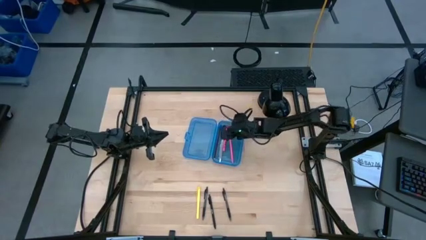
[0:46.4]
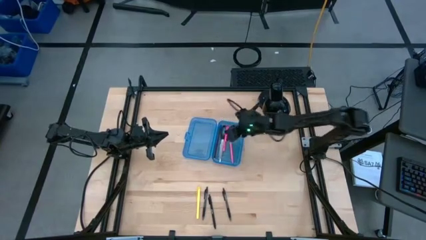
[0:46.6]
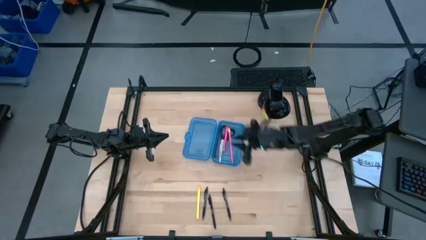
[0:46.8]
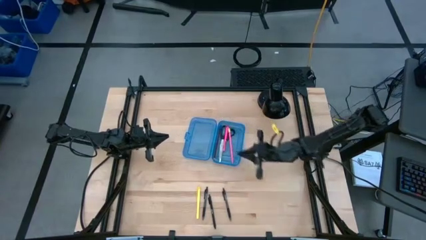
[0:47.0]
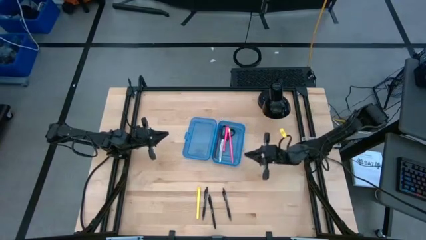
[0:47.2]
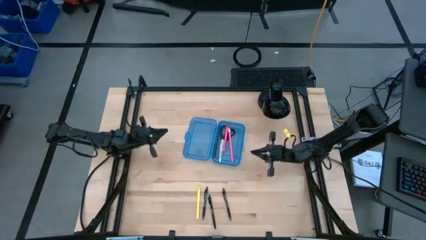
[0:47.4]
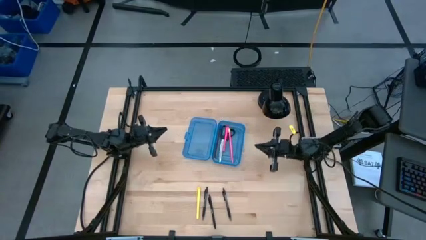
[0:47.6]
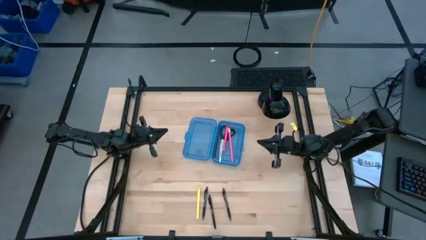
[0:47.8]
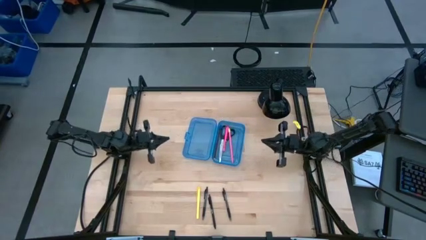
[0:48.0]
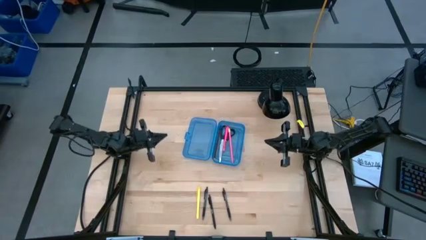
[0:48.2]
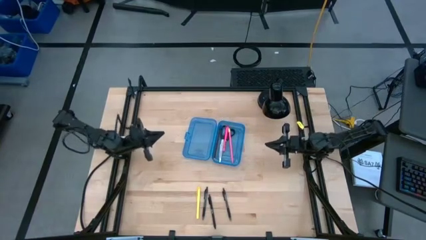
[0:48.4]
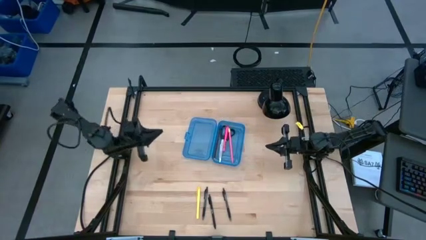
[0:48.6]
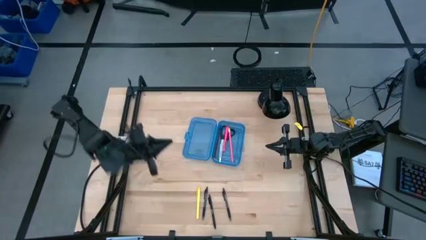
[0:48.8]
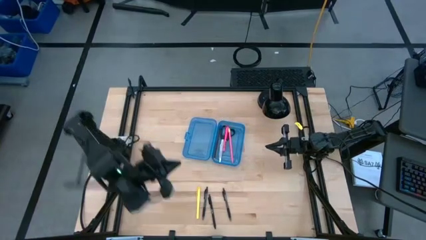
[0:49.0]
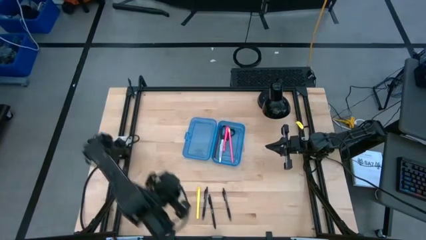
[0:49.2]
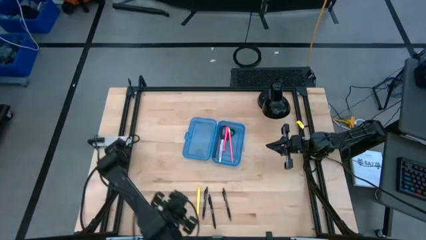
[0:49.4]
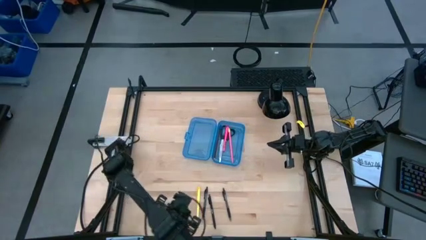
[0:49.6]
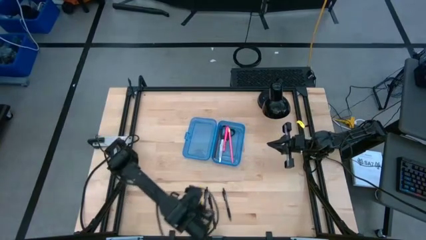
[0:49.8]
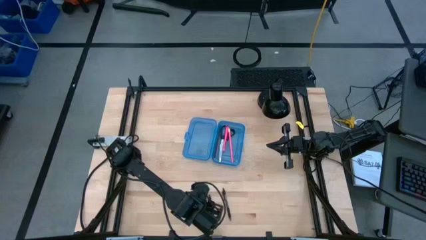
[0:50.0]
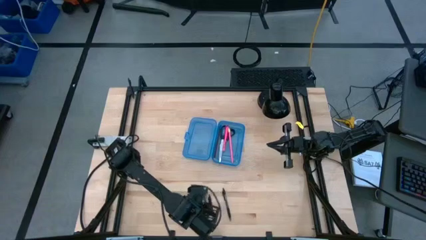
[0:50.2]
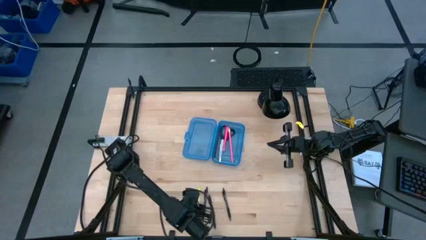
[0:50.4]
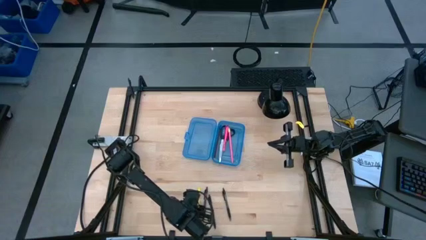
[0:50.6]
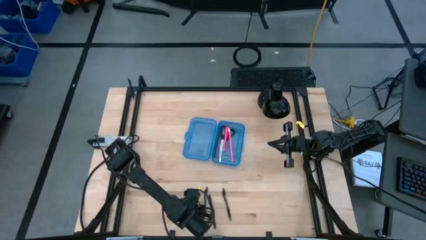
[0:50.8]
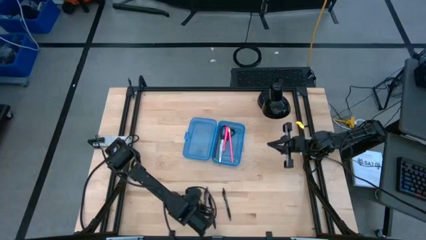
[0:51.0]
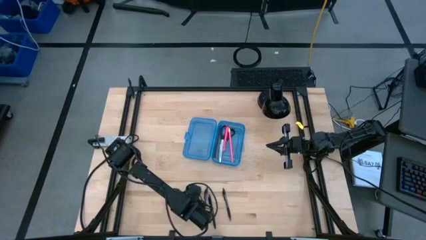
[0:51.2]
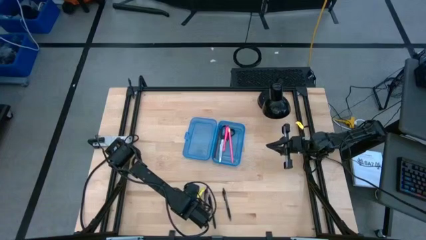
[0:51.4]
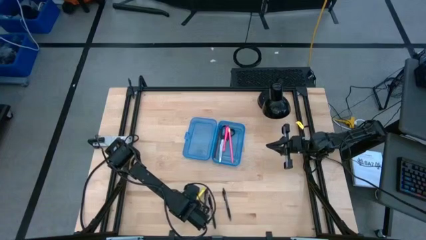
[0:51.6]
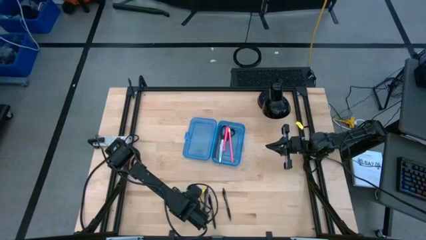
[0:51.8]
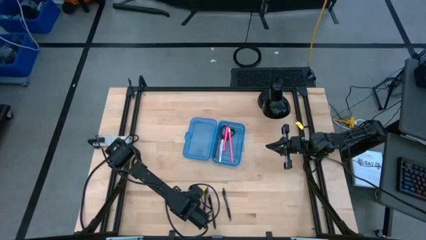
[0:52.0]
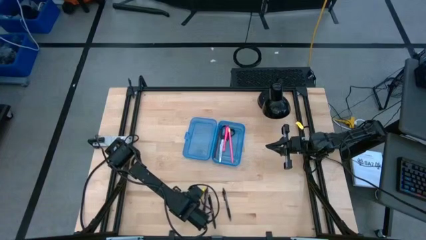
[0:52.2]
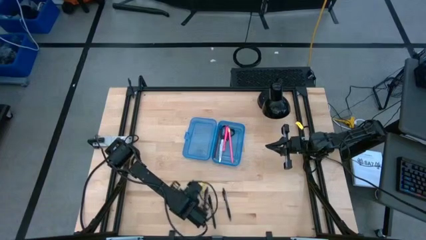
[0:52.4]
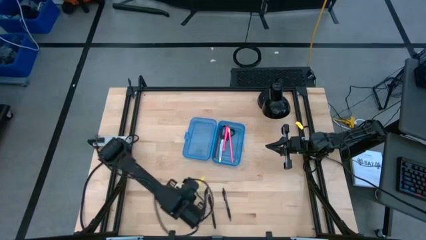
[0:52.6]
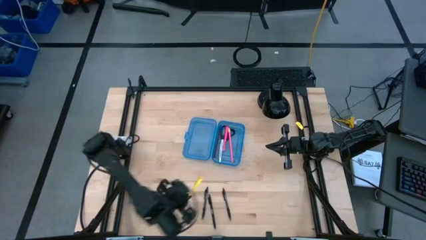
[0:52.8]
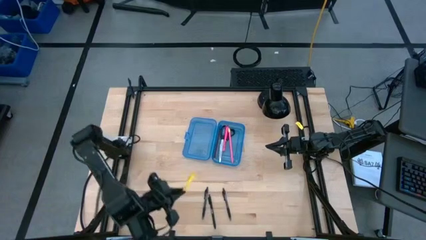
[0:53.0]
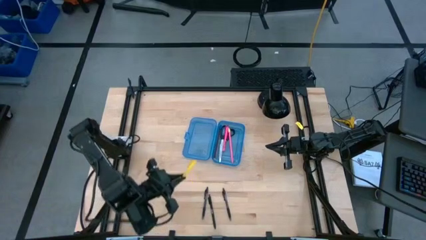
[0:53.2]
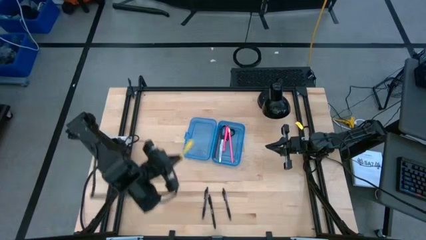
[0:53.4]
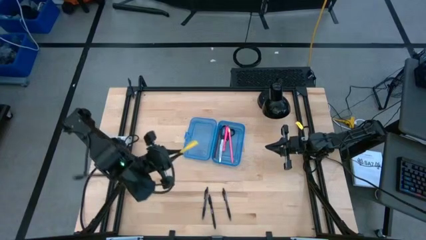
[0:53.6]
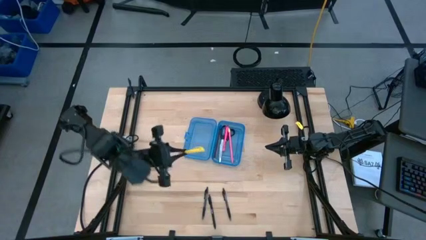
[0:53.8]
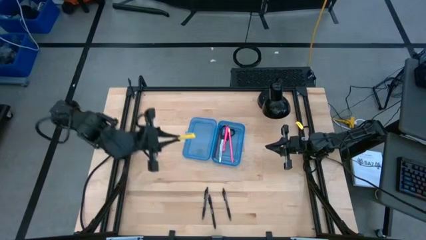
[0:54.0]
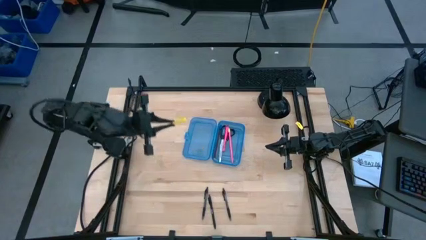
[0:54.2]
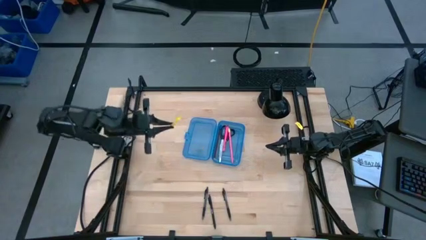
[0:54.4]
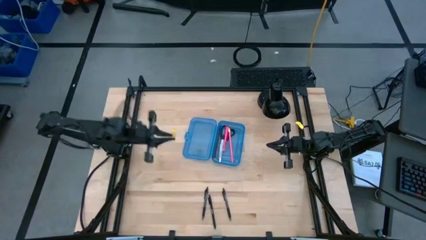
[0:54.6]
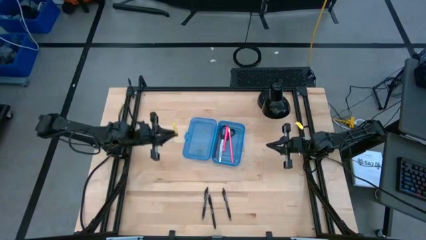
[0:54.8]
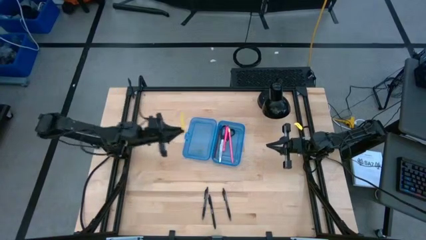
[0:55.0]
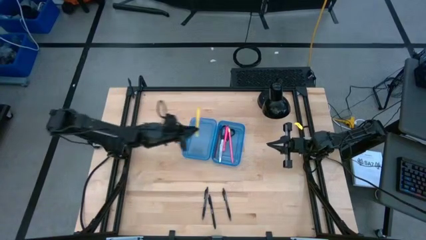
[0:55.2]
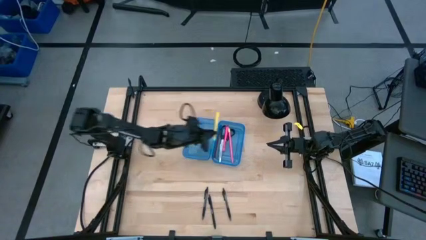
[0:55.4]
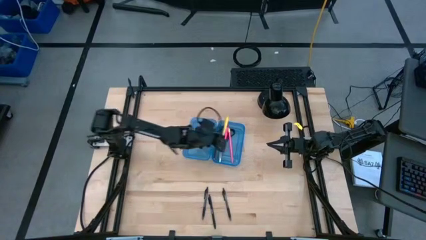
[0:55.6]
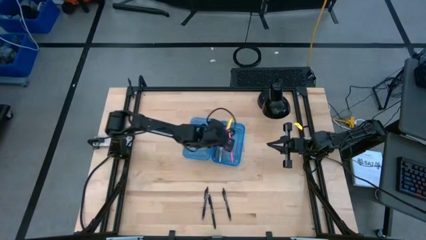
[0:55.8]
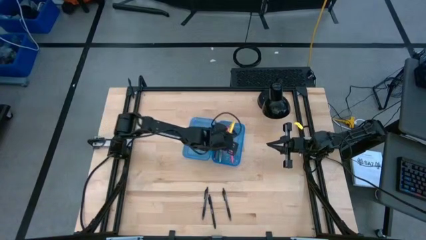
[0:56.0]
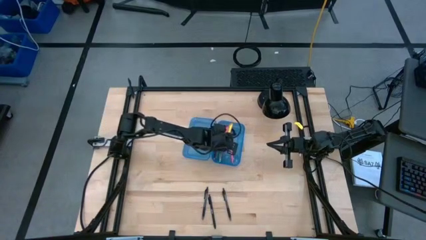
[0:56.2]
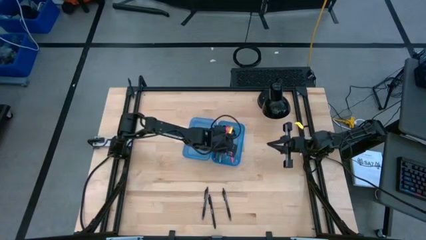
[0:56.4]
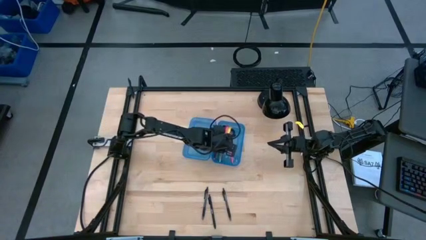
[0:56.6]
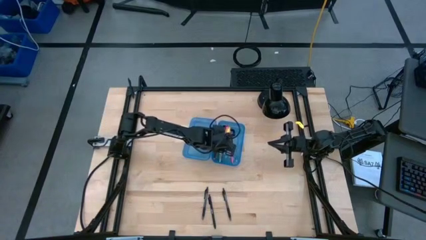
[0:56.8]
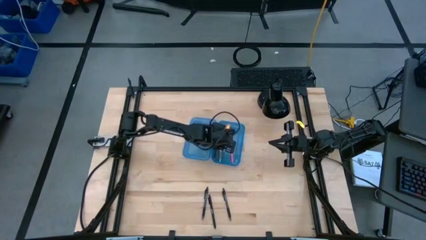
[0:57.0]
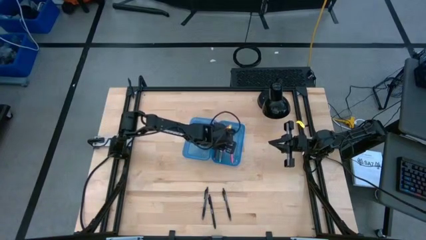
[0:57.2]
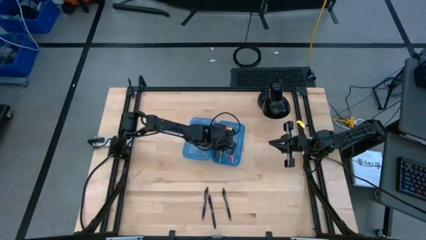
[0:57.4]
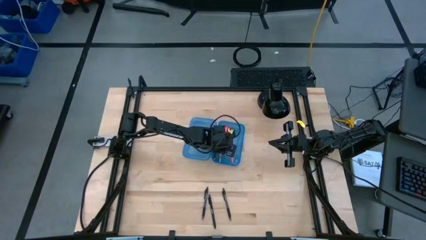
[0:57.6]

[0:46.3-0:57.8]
Task: Pick & place school supplies into a supply box
Put the yellow pen into the supply box

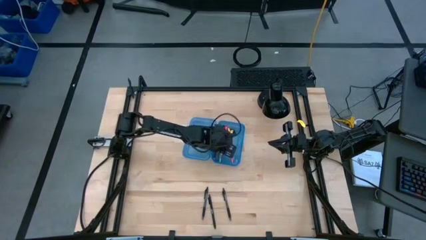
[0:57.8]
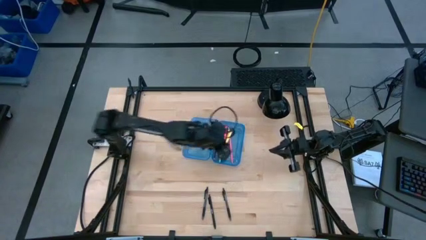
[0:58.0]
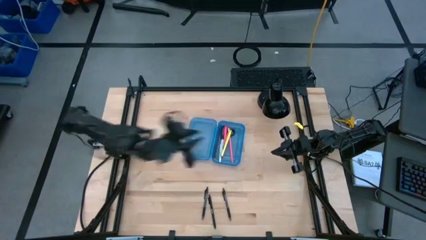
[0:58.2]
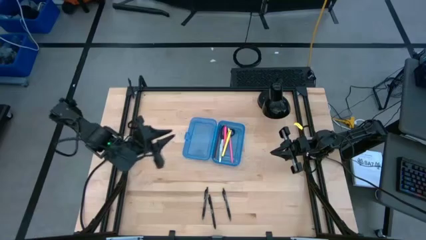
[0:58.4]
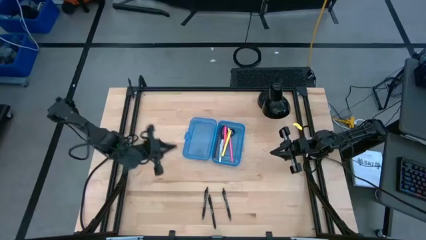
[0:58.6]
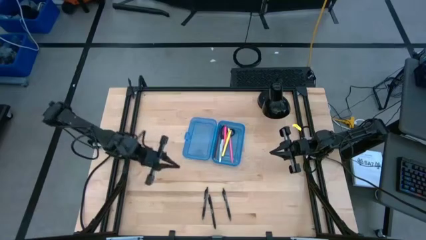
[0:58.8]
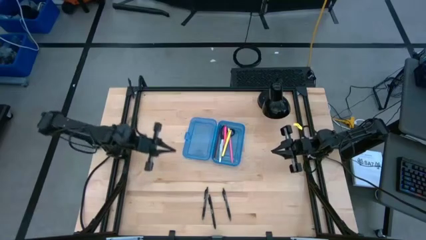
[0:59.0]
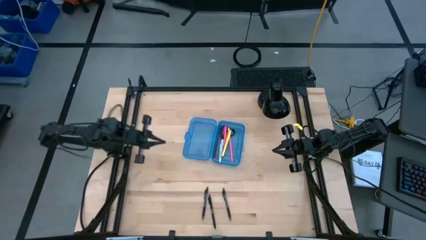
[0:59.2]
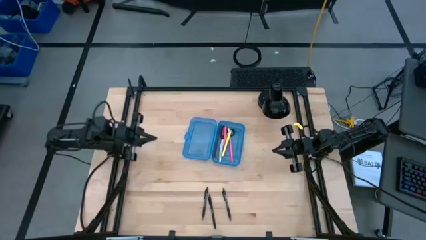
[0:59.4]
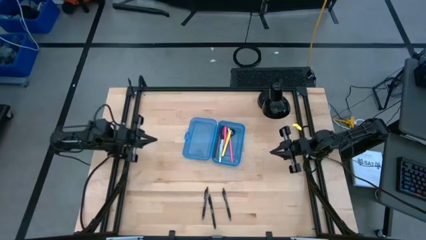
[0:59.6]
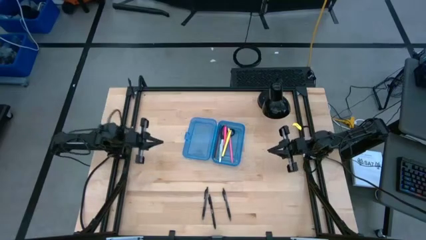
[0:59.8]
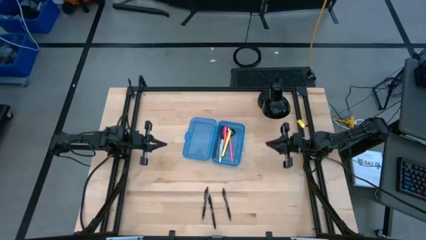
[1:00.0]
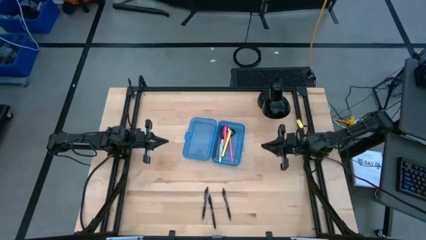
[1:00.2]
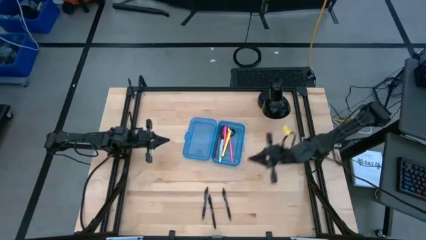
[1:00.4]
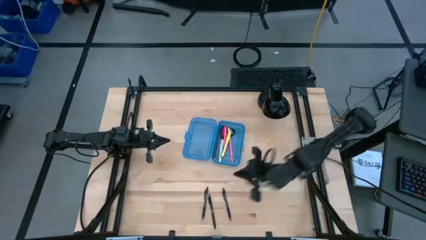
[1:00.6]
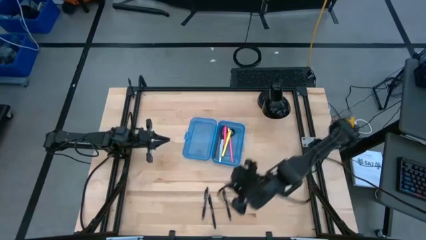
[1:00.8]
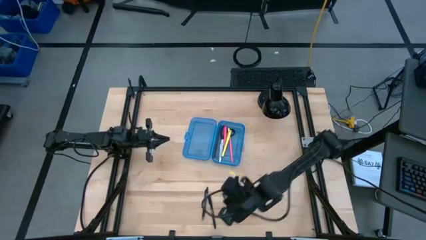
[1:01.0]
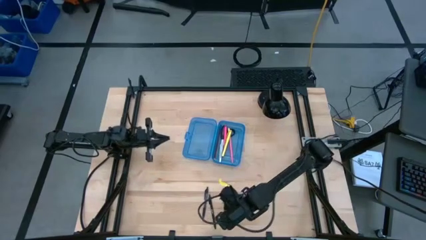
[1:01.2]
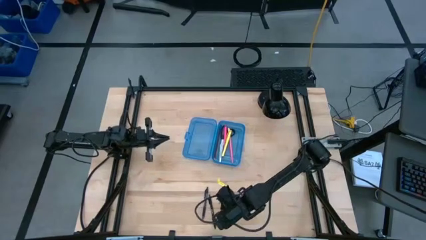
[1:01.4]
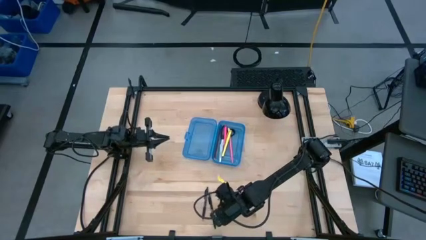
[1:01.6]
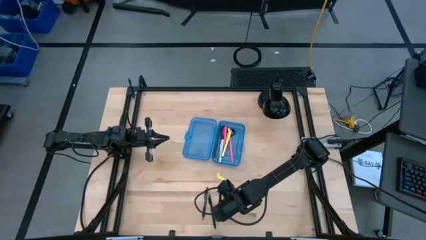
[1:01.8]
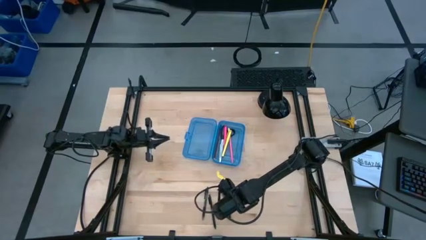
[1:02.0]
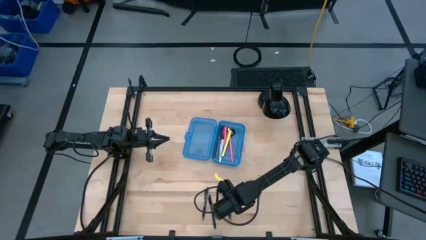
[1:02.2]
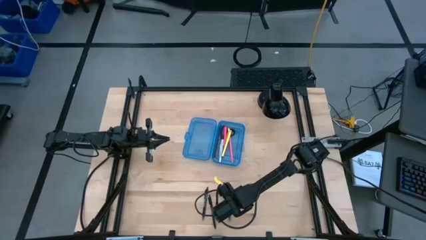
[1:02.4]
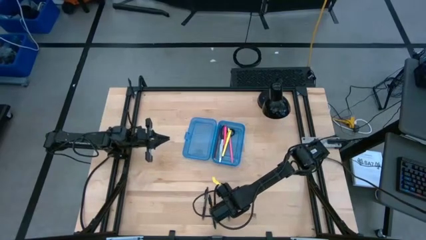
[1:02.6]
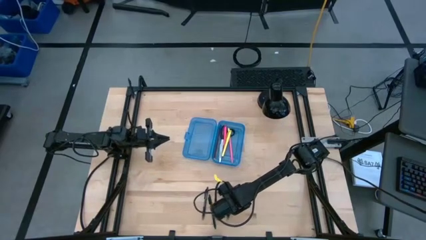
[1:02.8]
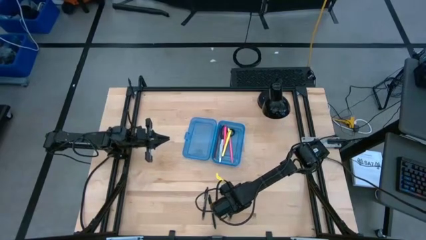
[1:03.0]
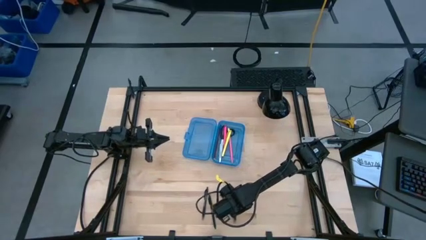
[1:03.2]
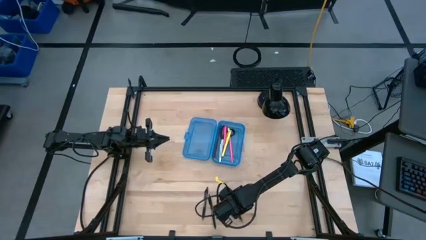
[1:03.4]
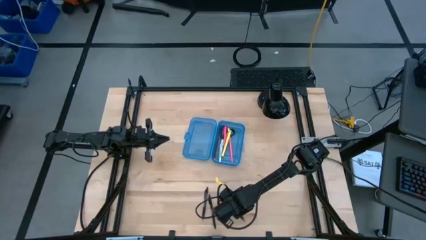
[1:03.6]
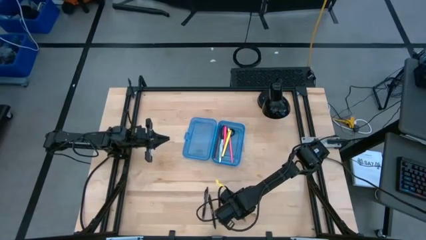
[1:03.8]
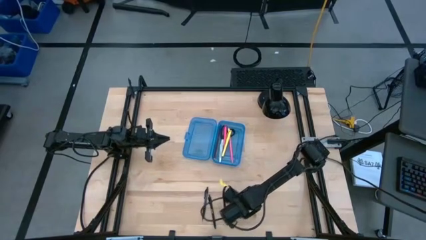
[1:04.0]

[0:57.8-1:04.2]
Put the right black pen into the supply box
